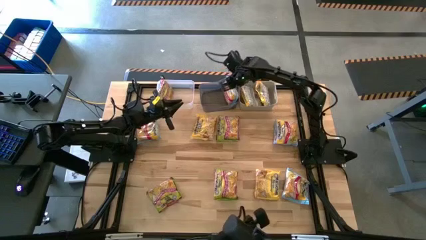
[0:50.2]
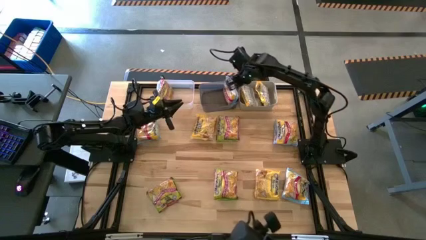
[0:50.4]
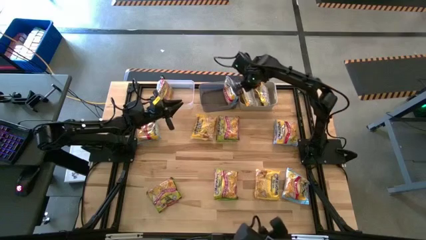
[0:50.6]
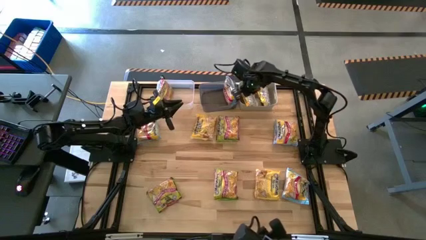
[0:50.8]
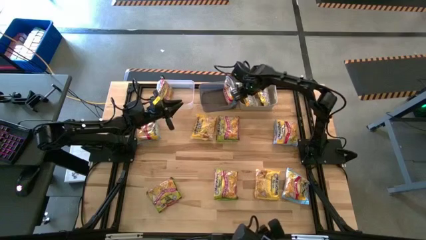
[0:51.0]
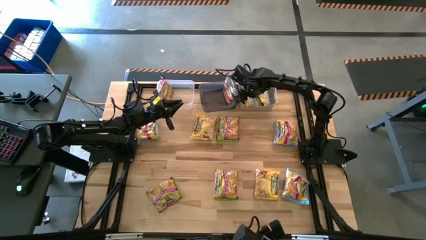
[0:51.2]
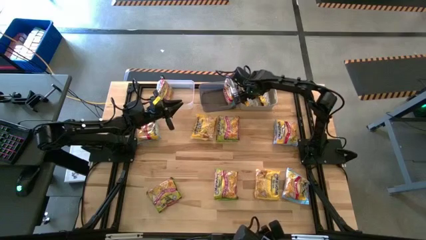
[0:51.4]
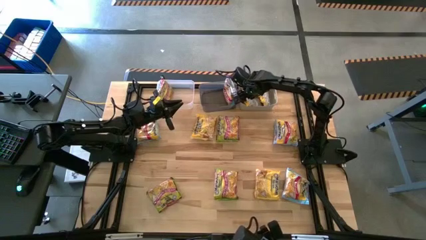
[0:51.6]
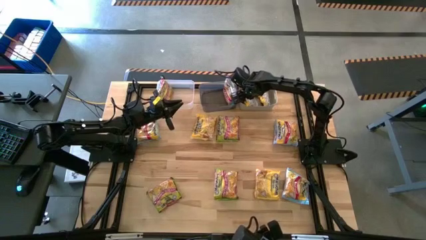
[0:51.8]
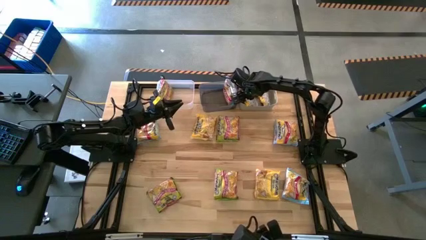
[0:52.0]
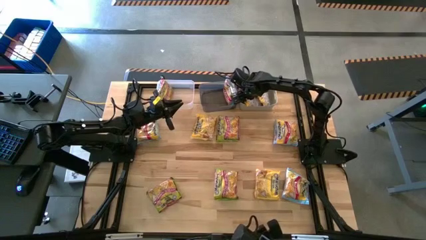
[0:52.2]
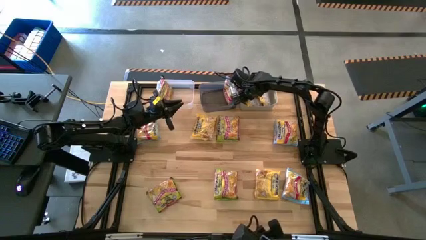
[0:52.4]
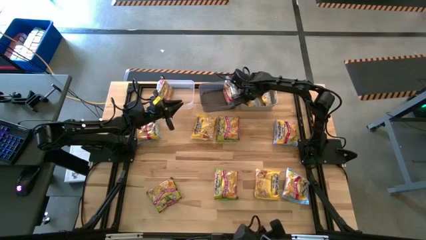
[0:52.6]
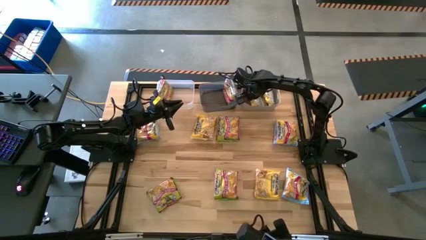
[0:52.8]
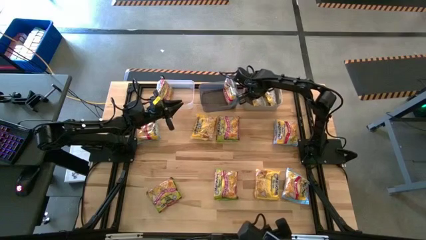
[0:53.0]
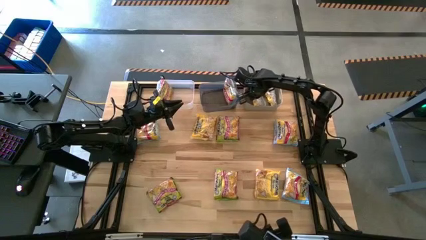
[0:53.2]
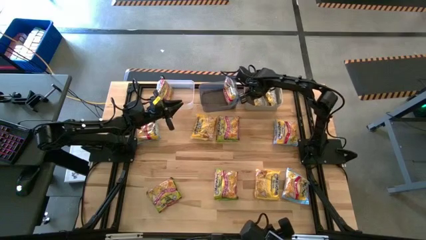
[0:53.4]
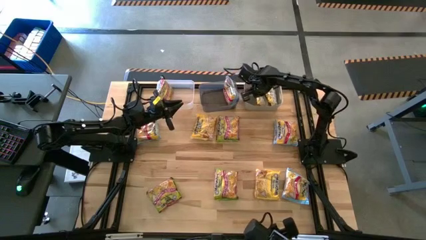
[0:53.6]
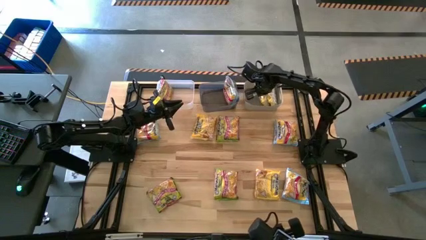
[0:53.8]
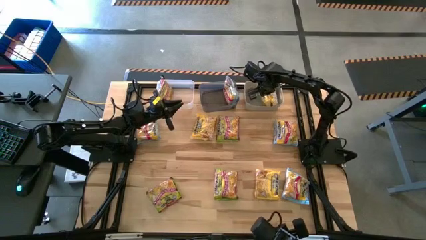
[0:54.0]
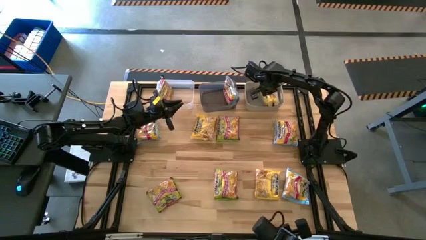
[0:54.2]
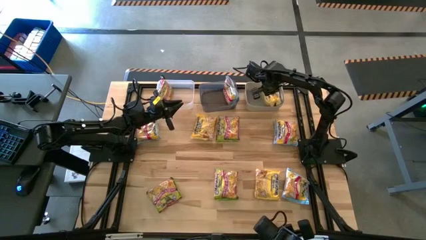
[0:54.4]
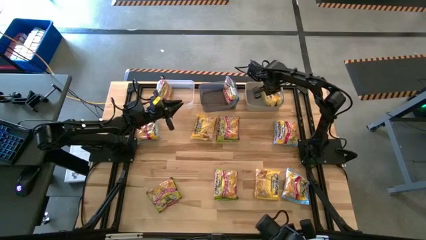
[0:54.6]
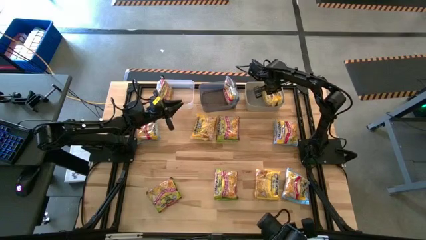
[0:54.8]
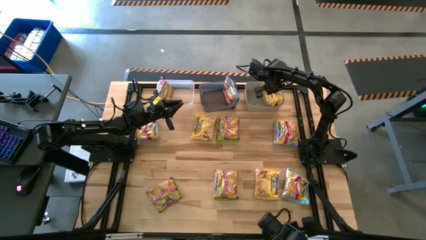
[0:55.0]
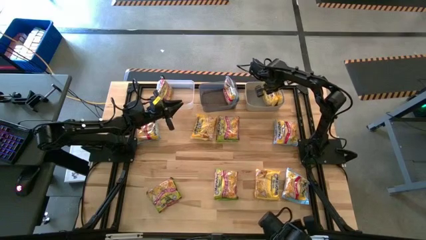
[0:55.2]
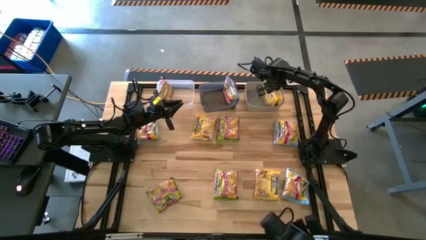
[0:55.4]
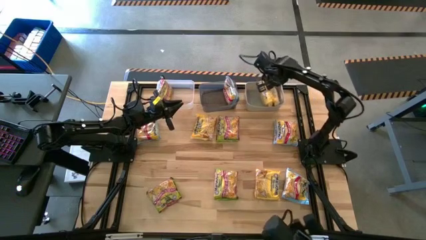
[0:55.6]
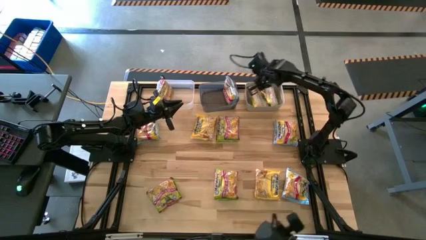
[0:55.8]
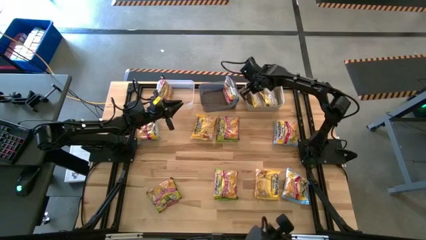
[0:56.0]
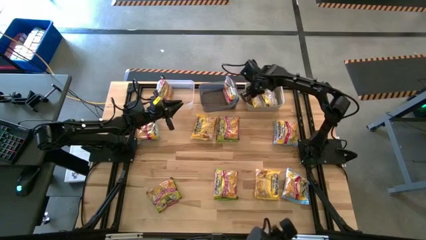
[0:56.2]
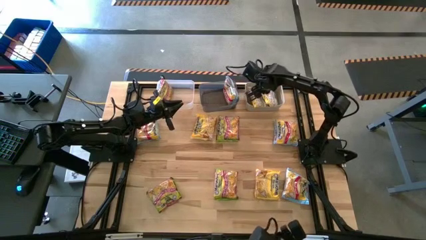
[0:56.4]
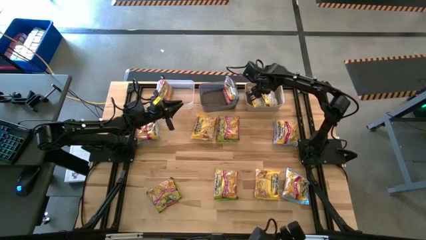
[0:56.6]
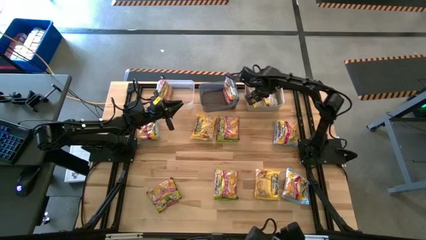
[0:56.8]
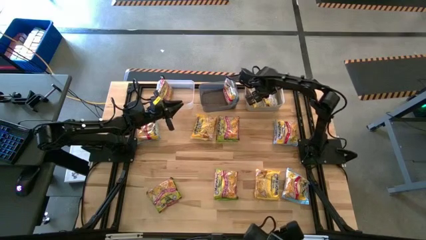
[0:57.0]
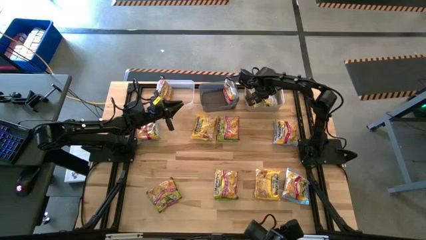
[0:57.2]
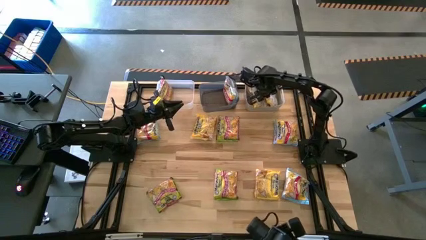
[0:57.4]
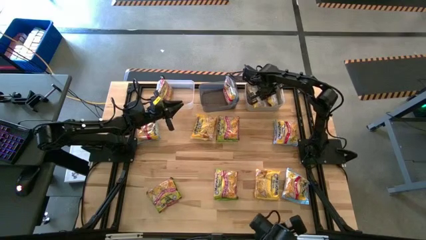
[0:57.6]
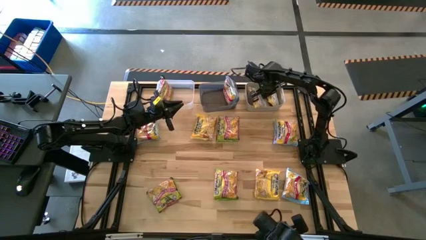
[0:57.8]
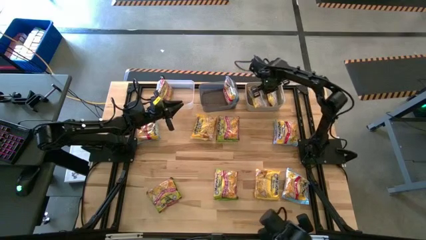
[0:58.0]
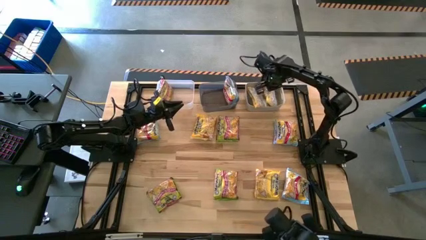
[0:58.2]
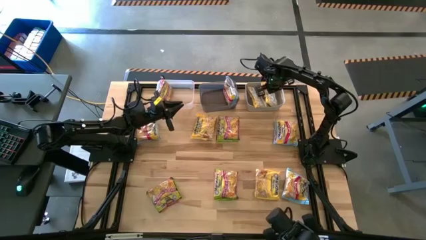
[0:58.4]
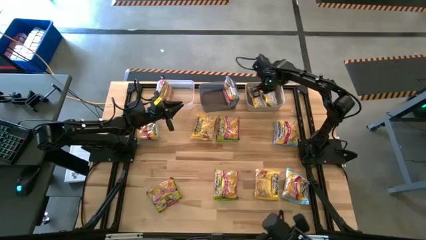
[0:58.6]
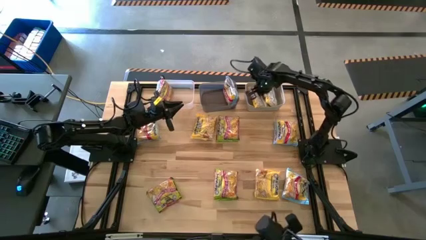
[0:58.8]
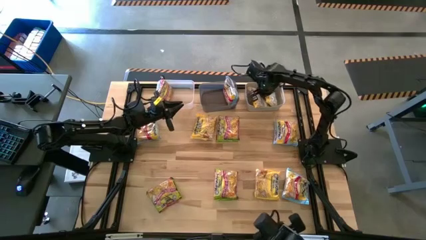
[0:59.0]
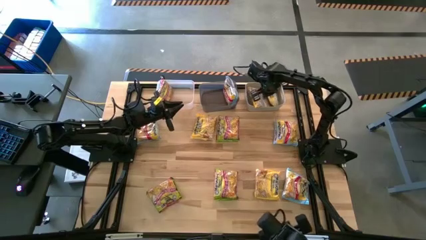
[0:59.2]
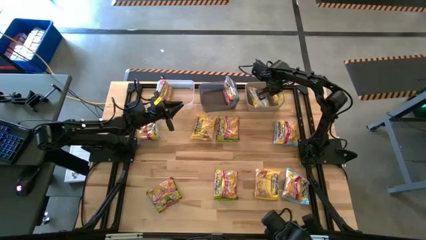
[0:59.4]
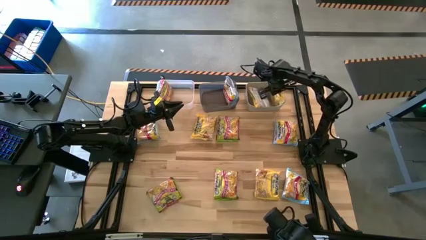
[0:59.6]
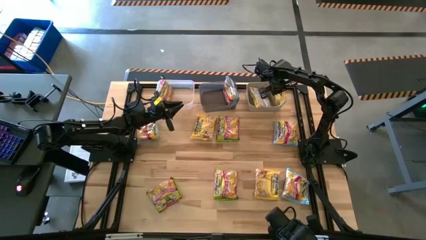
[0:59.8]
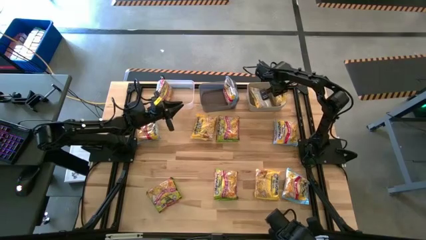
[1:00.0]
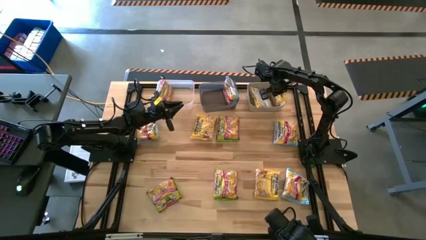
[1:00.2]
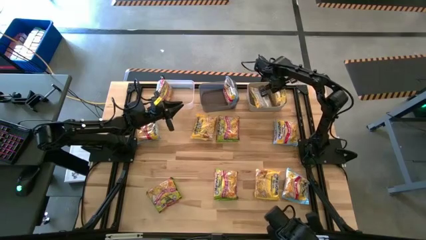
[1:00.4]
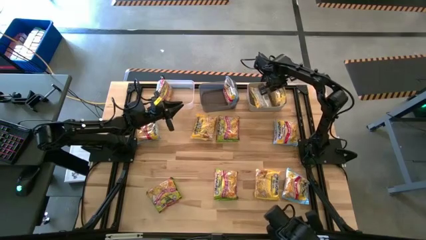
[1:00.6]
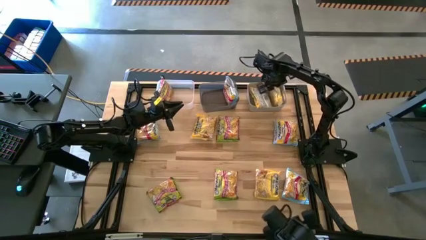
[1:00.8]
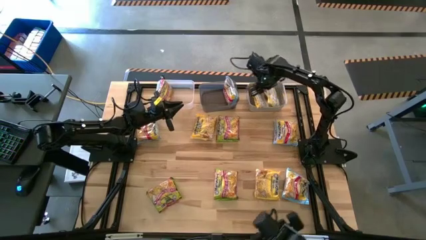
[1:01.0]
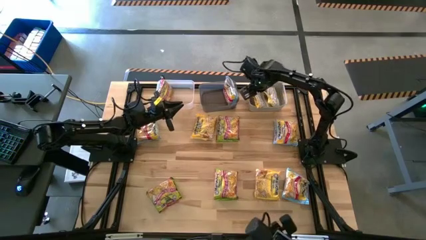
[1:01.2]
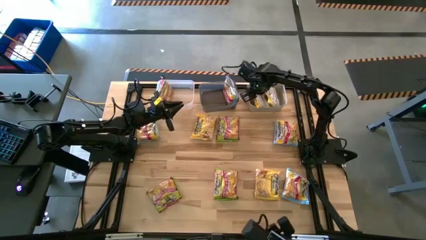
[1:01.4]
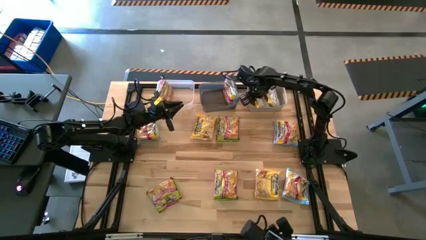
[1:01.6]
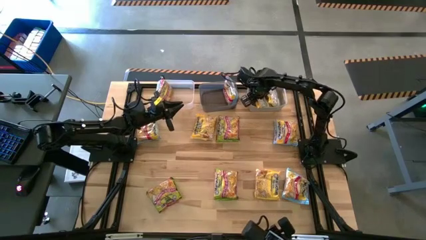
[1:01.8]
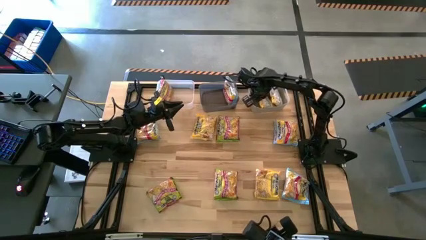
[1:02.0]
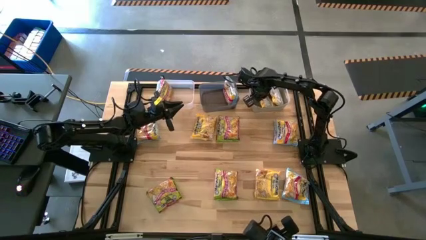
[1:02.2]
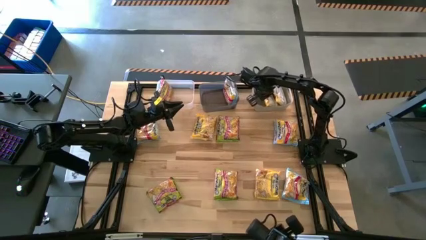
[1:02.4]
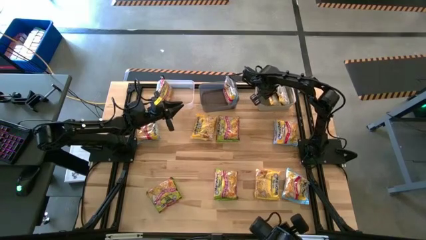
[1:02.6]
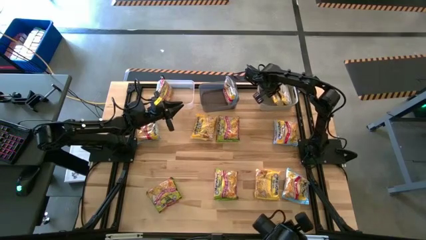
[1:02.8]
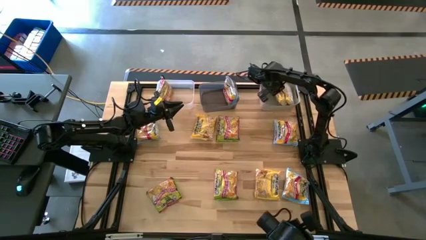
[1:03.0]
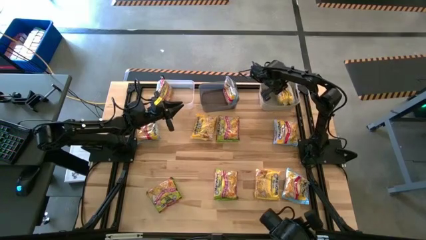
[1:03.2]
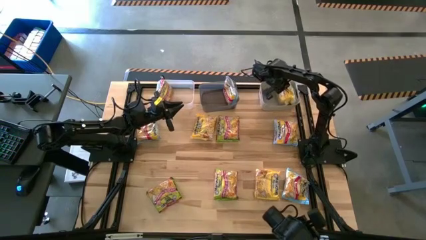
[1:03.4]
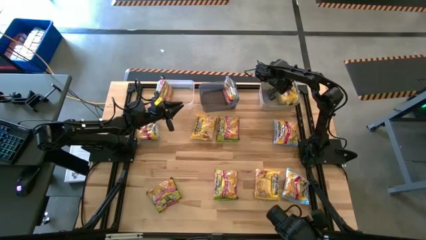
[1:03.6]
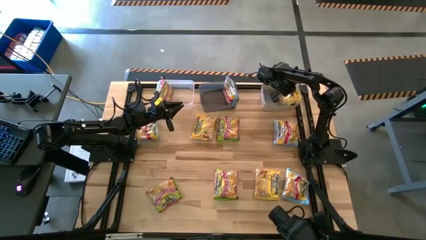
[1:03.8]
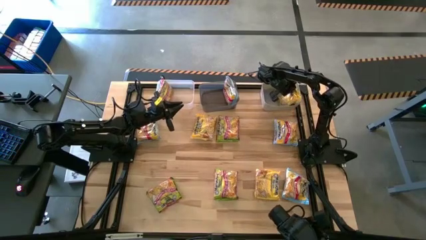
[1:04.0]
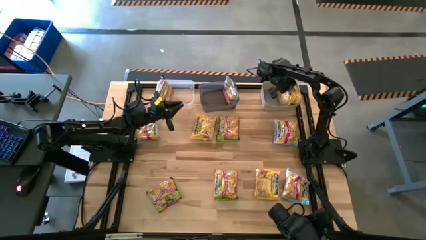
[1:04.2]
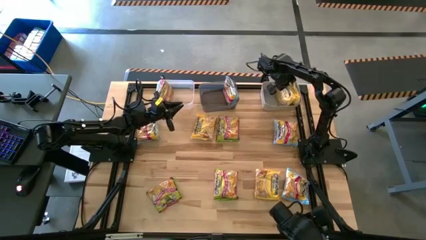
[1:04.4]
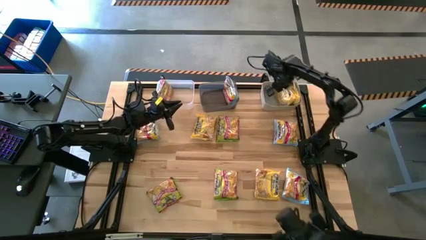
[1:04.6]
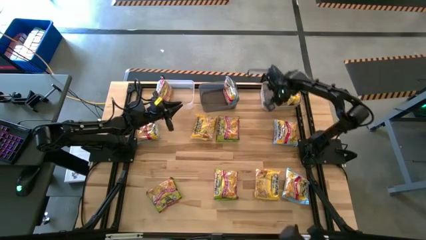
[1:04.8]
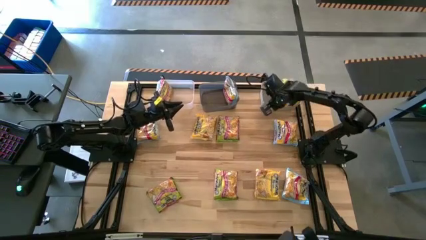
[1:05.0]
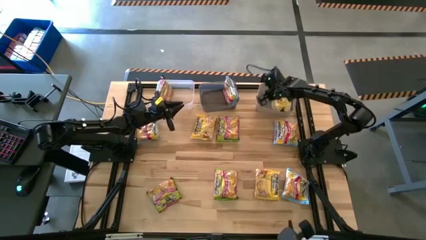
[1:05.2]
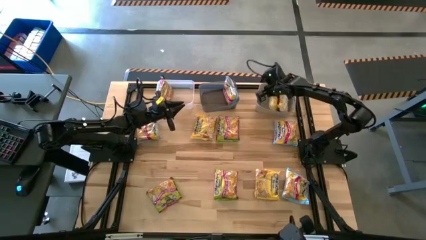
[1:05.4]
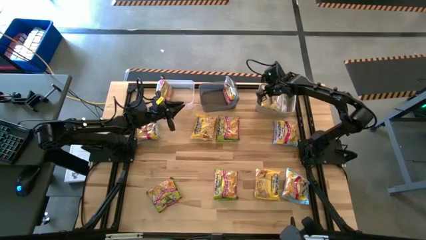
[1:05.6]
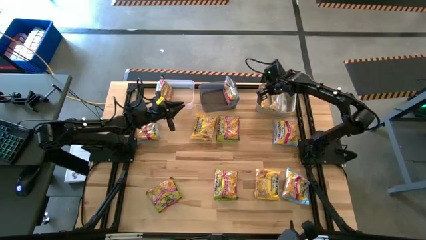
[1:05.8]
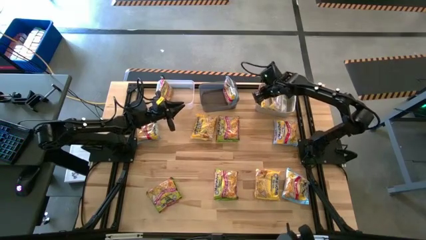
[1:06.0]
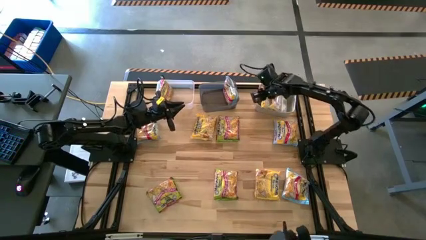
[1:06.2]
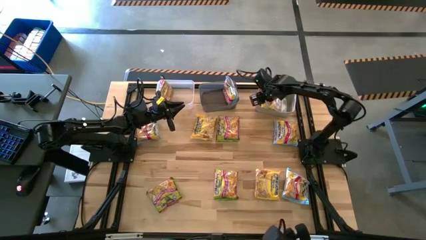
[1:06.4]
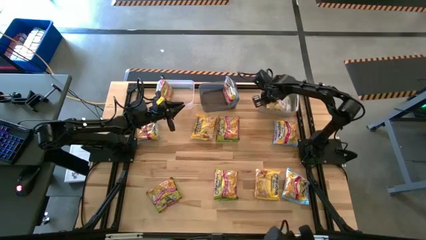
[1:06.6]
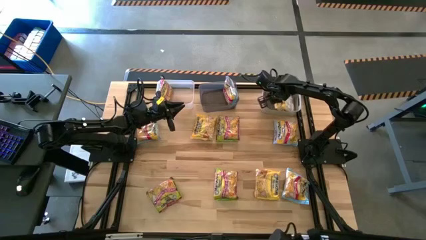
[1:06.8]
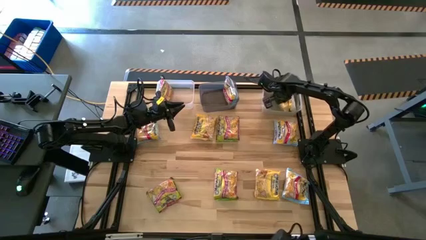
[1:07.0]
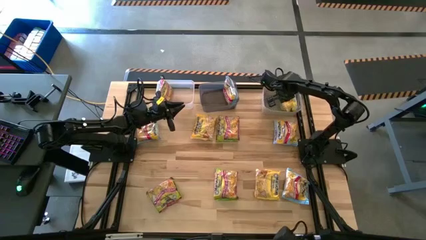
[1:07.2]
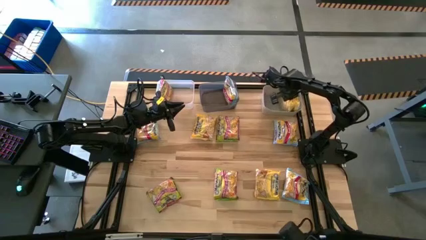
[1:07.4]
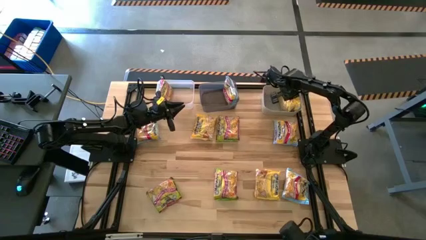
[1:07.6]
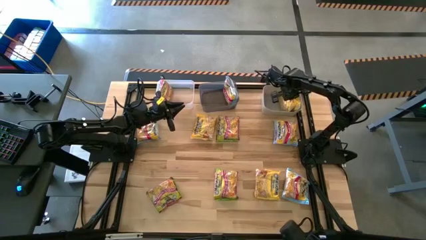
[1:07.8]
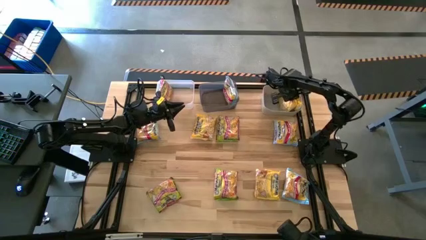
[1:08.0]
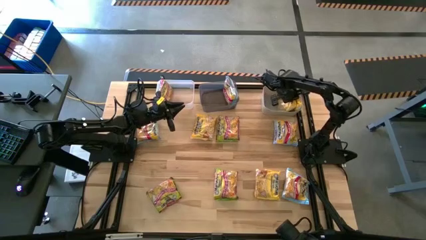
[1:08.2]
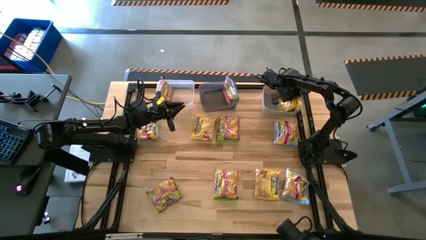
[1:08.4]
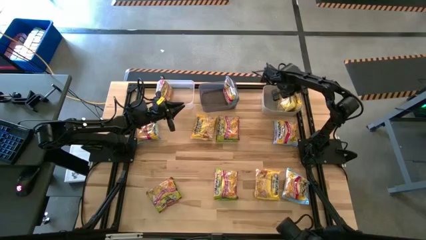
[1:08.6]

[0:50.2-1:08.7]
Task: Sort Maruchan noodles
Adjust the yellow noodles
